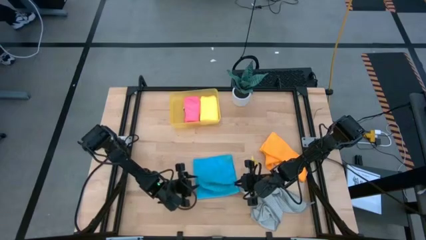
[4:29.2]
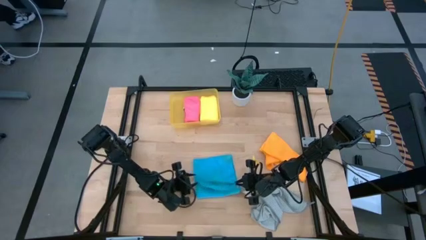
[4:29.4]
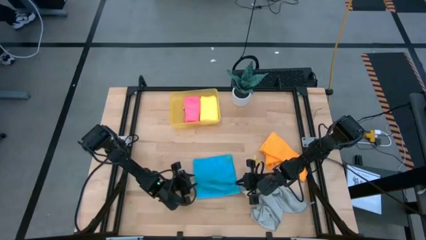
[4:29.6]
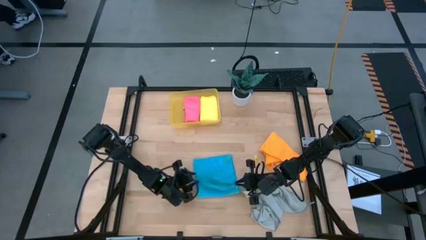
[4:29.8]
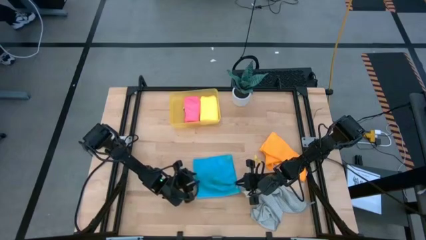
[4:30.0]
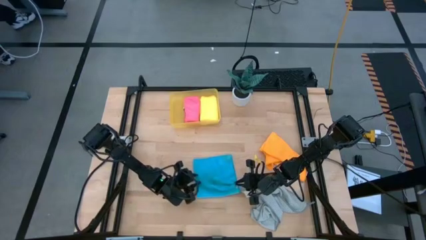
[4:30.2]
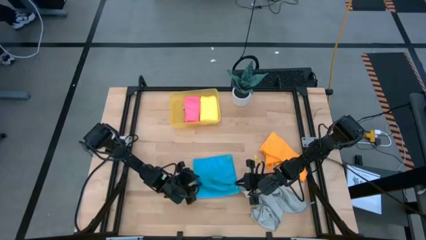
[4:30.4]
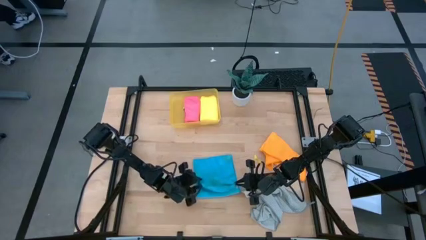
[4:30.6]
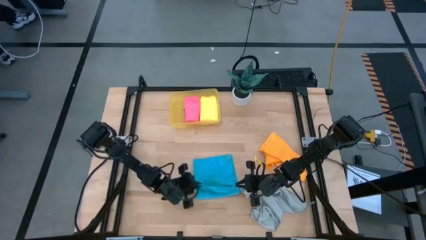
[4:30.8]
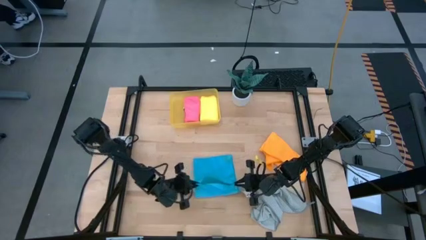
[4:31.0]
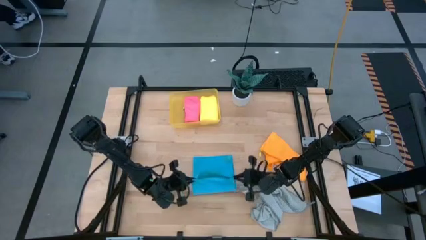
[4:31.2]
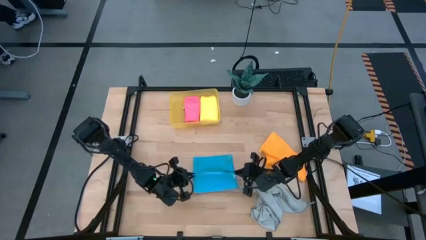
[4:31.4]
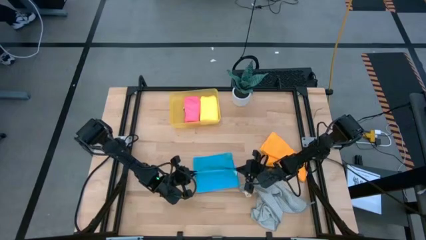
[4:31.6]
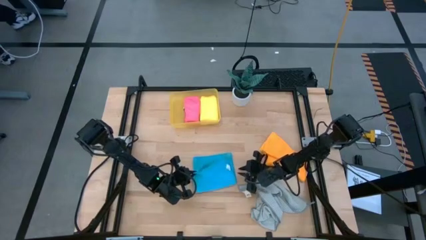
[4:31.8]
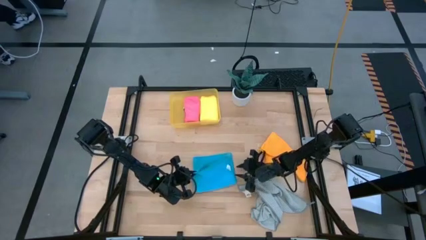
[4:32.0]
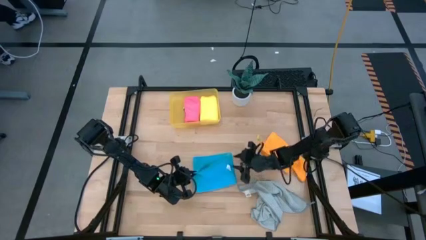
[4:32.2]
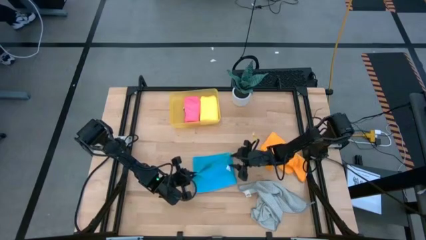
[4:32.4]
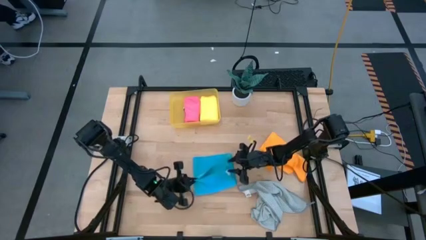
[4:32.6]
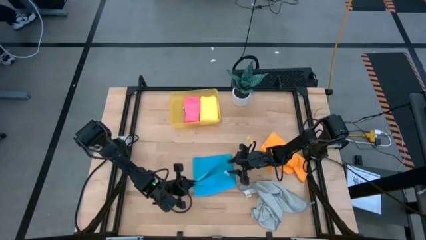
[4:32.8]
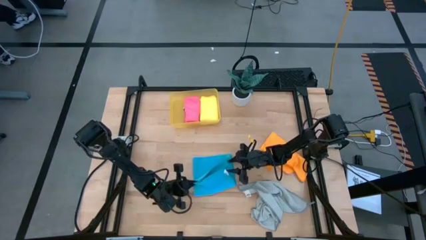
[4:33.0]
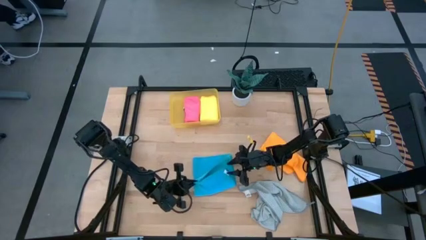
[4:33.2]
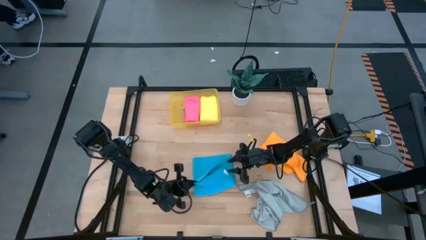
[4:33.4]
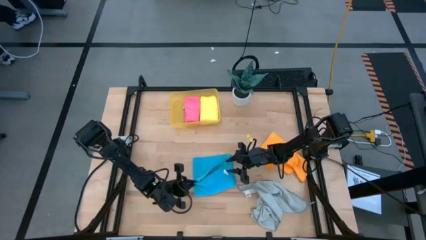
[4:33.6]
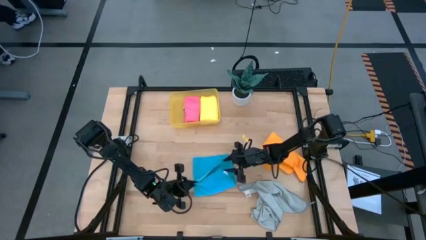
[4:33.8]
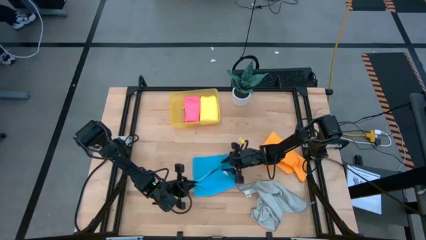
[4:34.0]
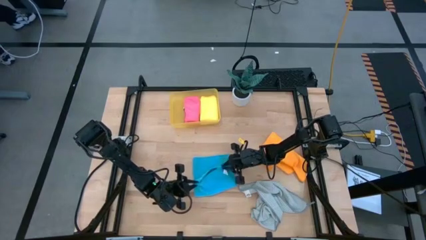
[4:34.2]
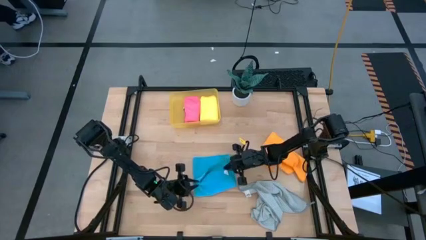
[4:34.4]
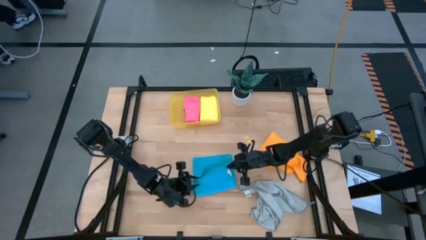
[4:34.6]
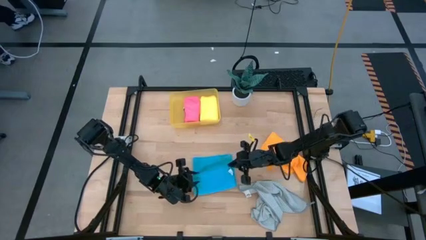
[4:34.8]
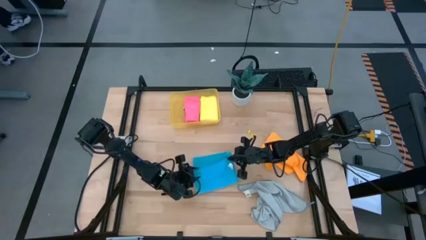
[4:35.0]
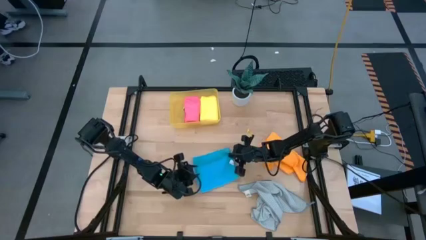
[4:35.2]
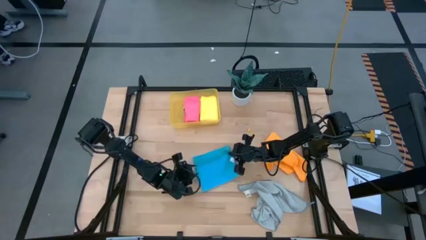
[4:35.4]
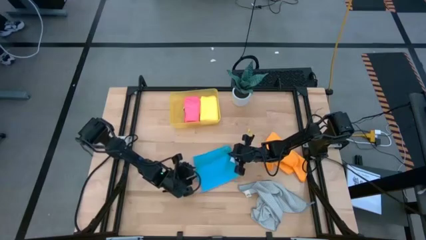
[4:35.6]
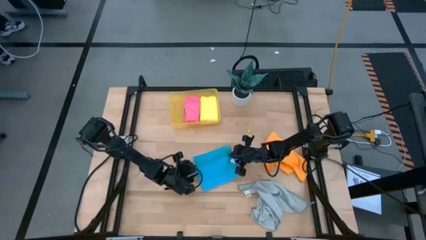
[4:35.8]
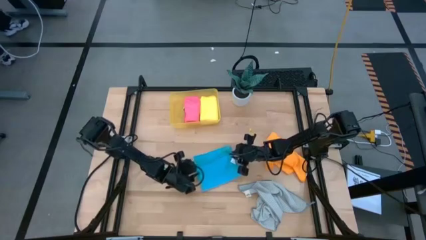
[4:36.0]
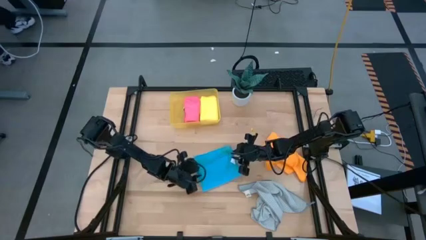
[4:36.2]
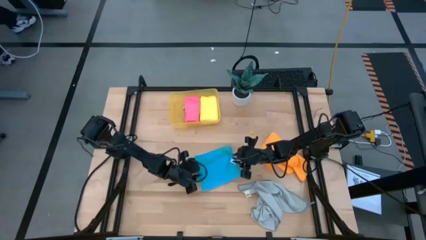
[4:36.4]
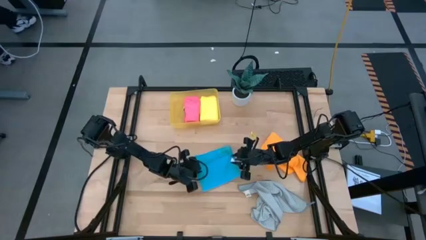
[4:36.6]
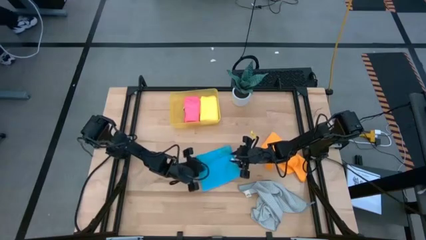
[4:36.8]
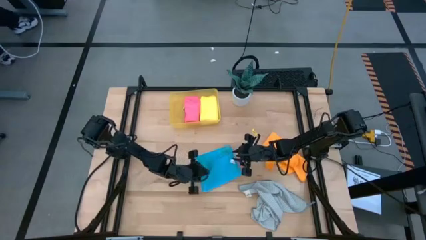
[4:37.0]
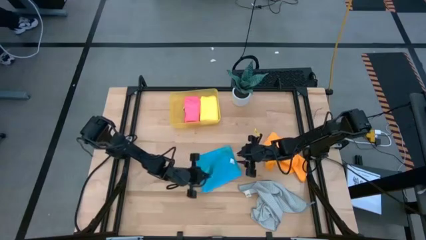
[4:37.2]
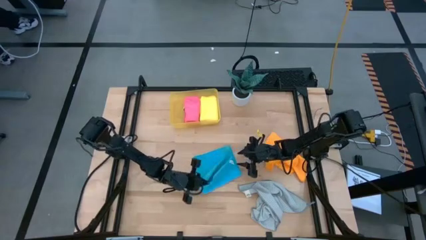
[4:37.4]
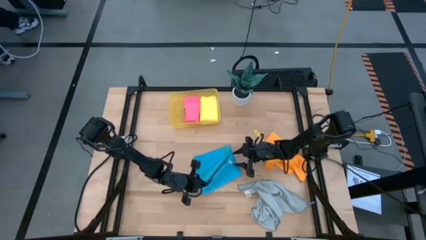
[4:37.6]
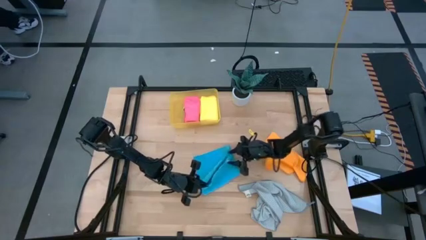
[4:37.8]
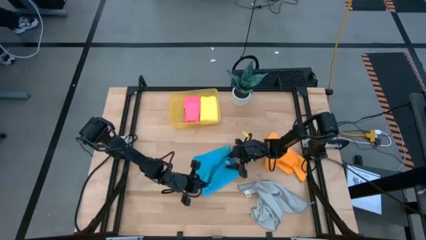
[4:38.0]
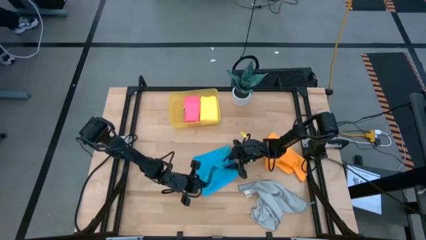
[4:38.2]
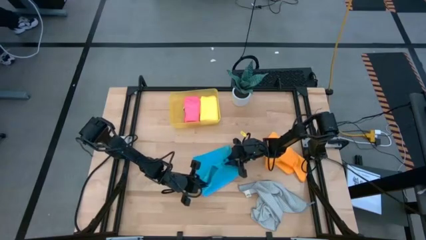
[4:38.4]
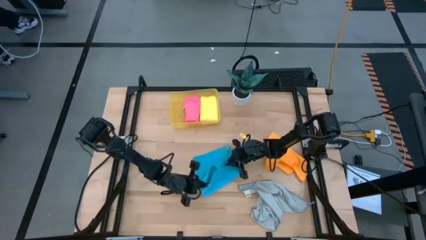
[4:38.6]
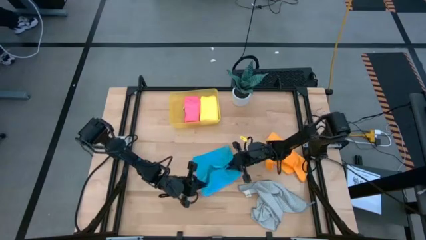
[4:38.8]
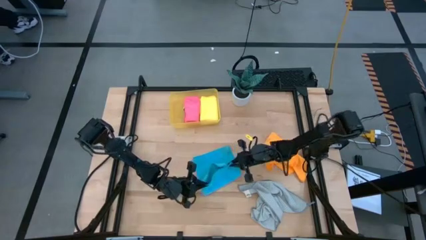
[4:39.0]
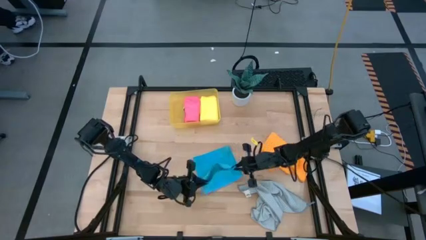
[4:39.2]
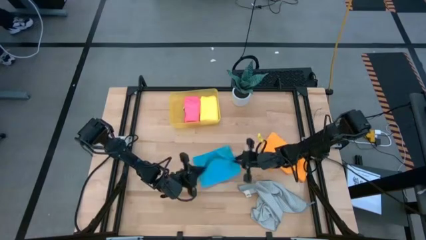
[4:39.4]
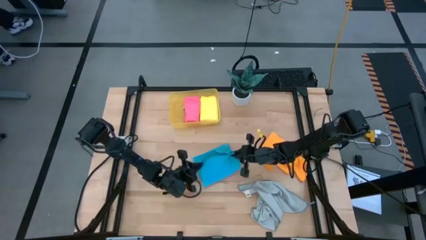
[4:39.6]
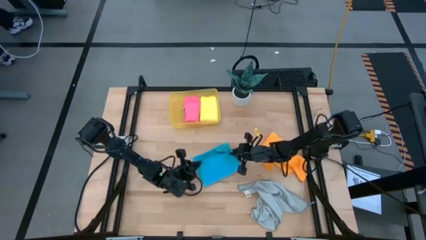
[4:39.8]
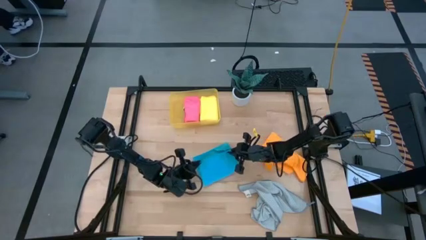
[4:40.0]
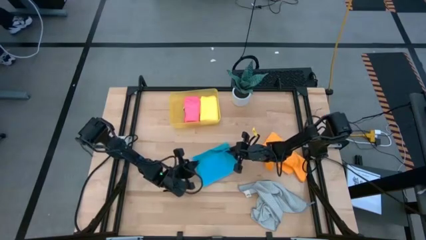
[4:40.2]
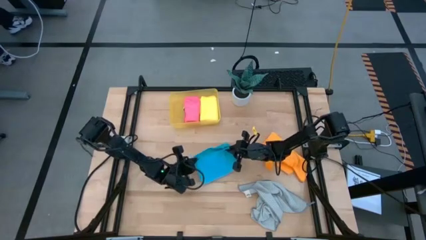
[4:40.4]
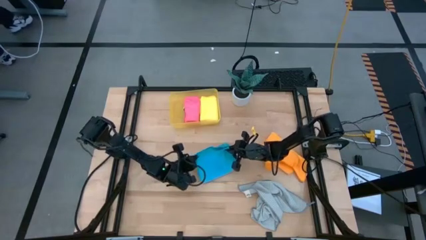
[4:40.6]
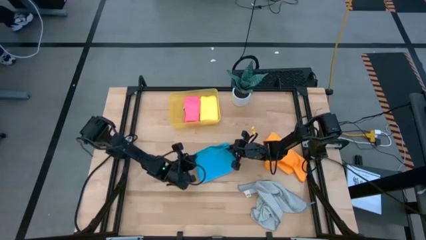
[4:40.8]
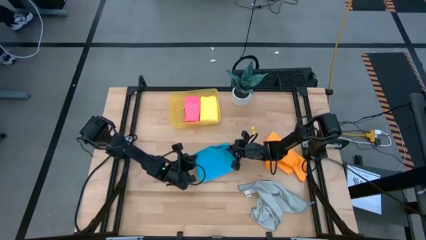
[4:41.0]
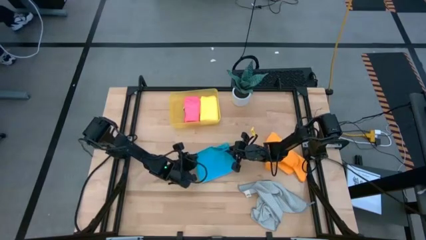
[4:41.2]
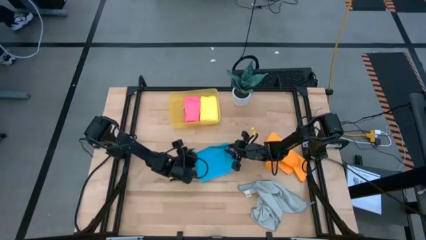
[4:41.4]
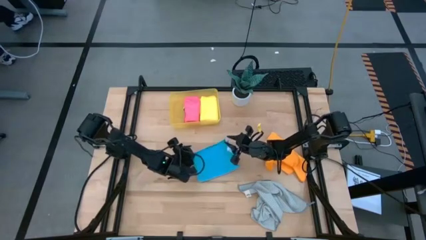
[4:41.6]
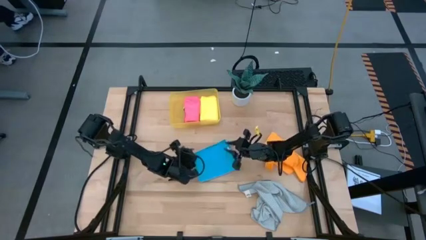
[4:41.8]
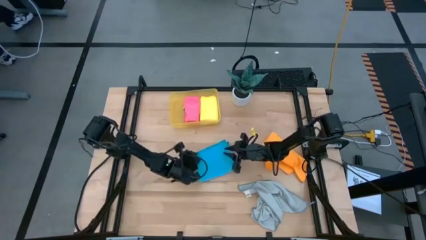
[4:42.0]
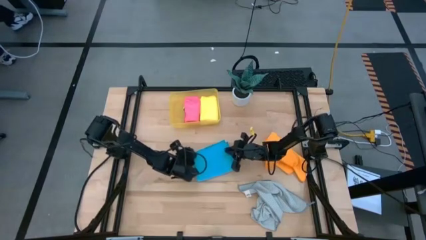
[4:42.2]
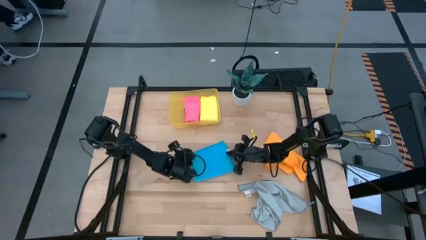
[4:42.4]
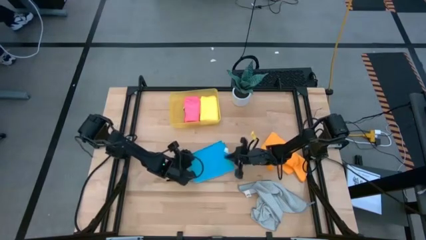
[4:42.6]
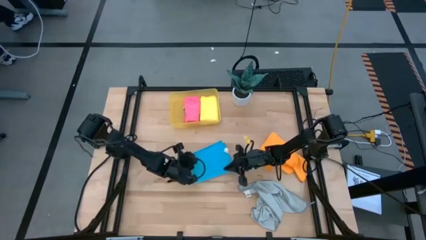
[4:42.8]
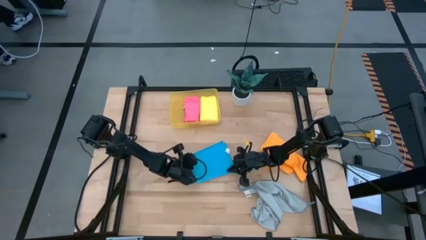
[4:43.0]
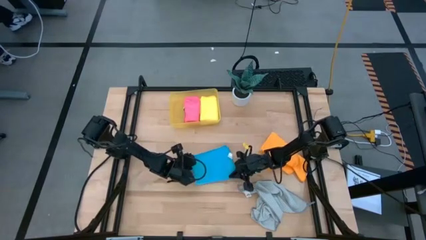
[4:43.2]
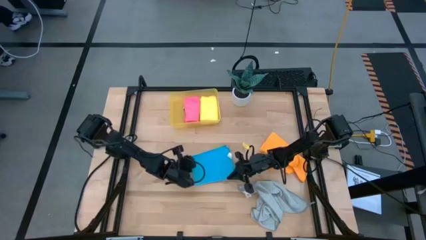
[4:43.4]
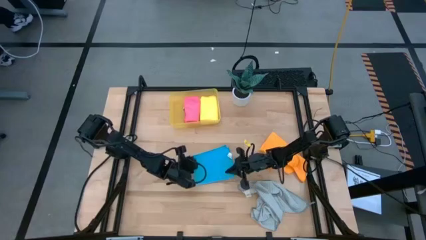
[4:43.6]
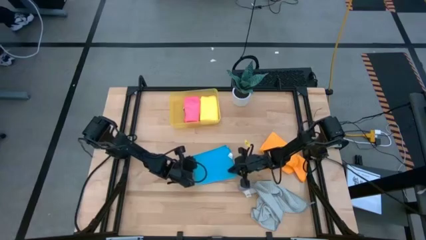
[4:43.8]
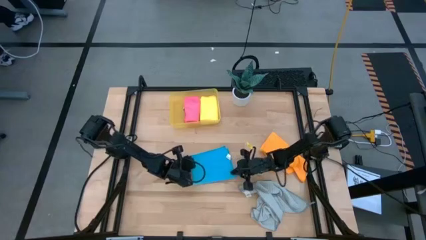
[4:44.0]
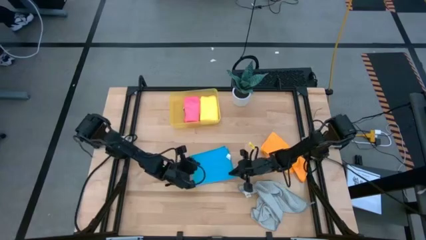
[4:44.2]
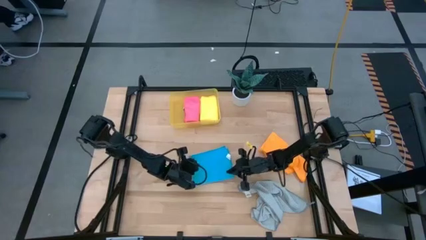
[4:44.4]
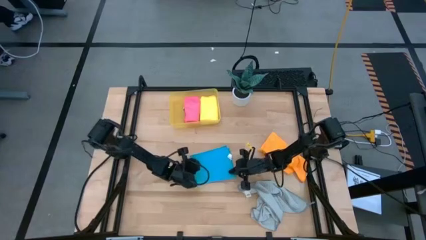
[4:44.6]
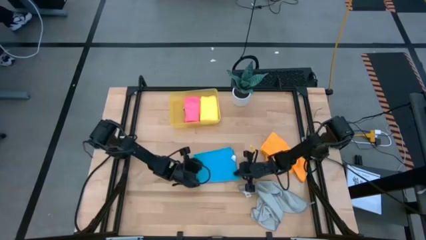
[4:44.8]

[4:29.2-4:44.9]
Task: Fold microfiber towels
Fold the blue microfiber cloth

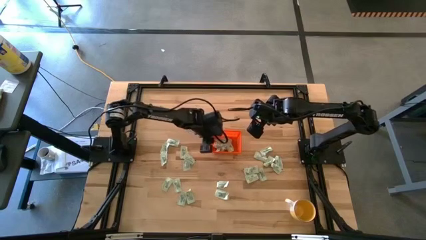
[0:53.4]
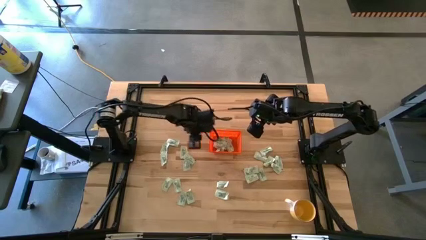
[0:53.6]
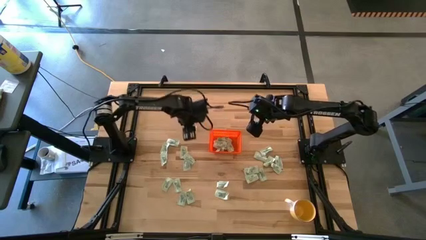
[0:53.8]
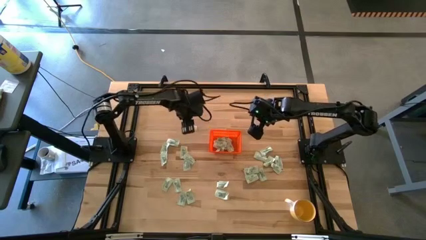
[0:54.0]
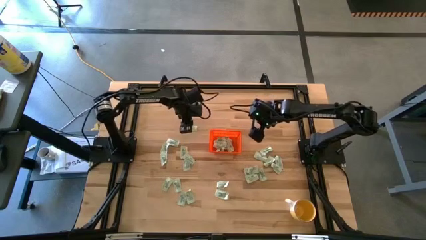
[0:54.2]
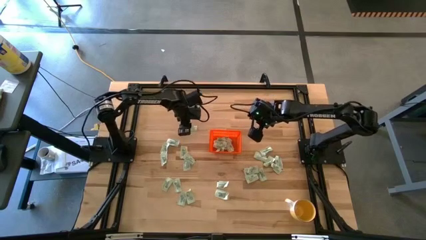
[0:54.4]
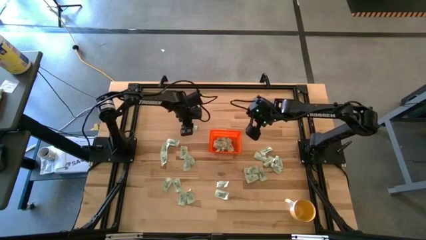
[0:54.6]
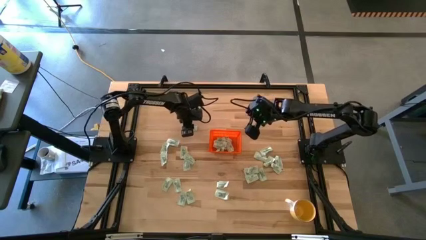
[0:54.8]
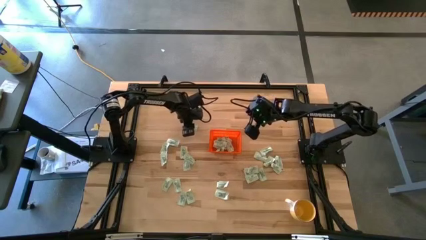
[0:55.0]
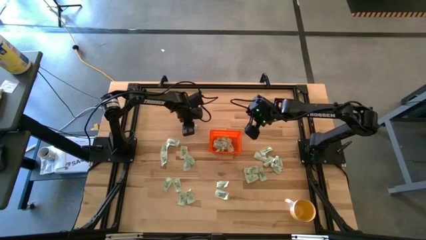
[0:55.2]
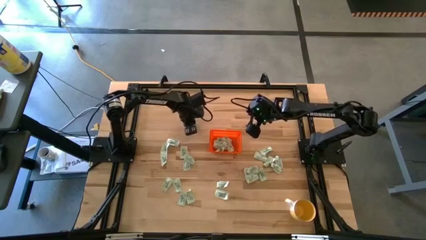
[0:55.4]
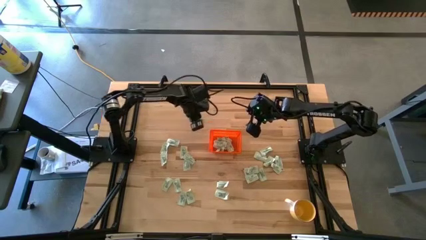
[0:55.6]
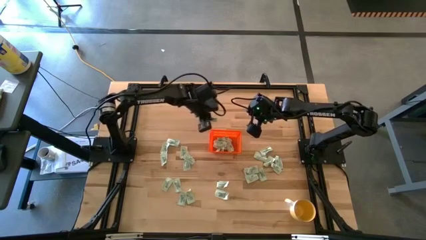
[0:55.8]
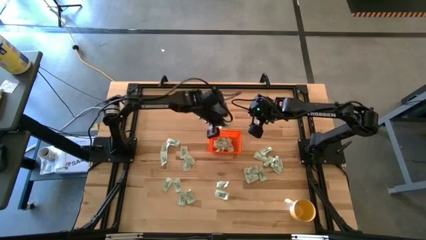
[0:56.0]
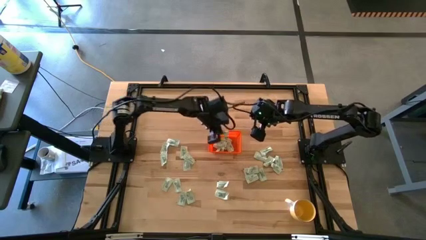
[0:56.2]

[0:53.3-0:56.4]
Task: Pick and place Stevia / Truvia into bins
Put the light green stevia packet into the orange basket
